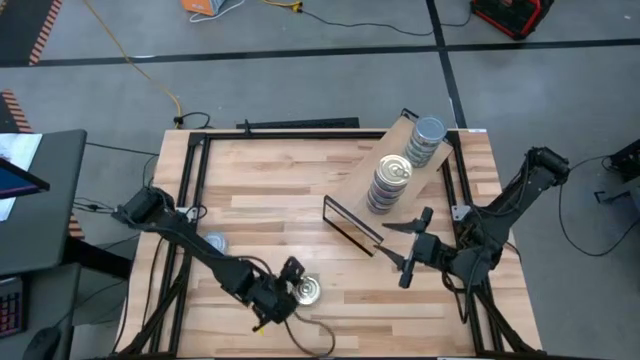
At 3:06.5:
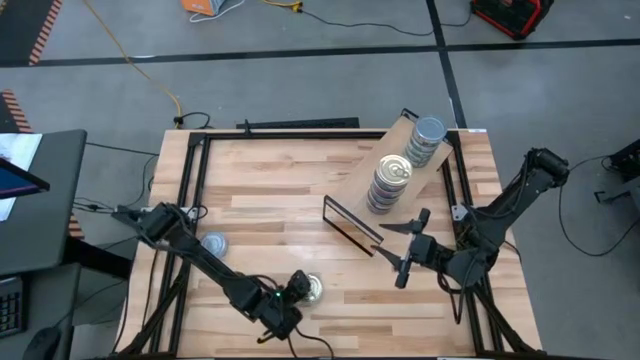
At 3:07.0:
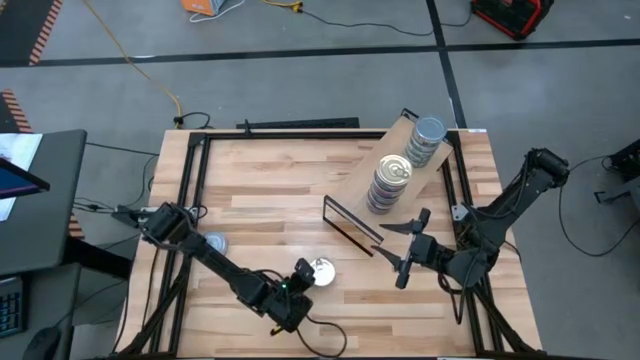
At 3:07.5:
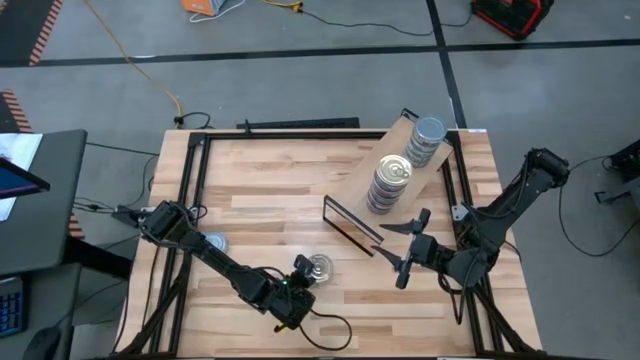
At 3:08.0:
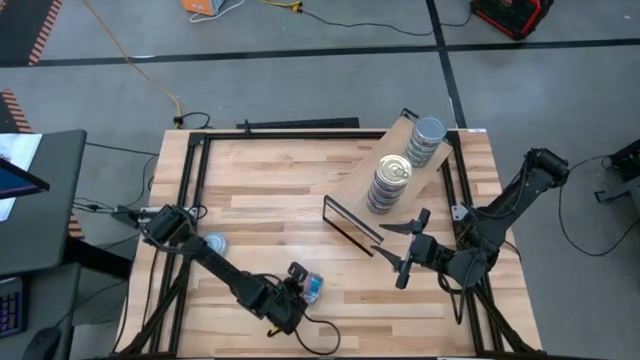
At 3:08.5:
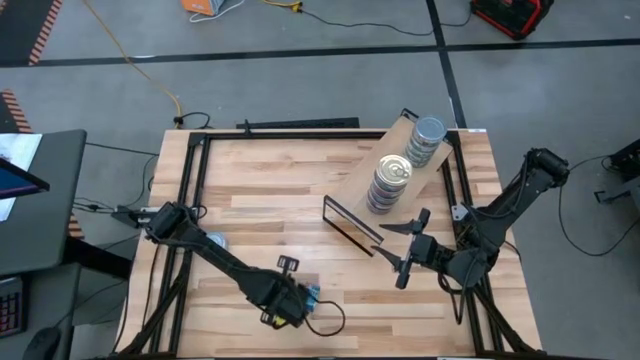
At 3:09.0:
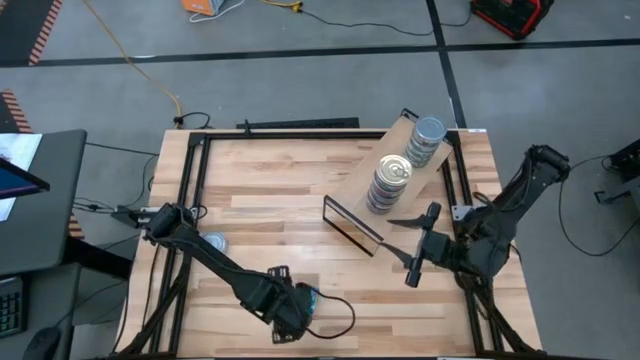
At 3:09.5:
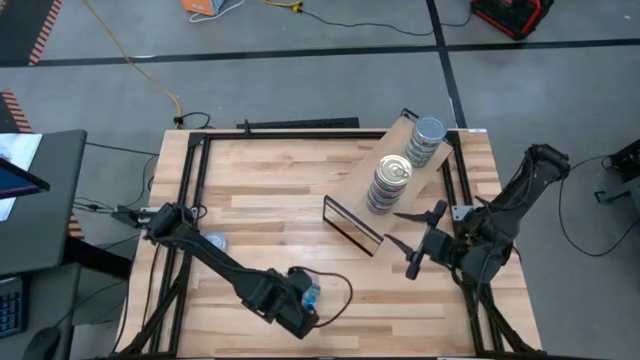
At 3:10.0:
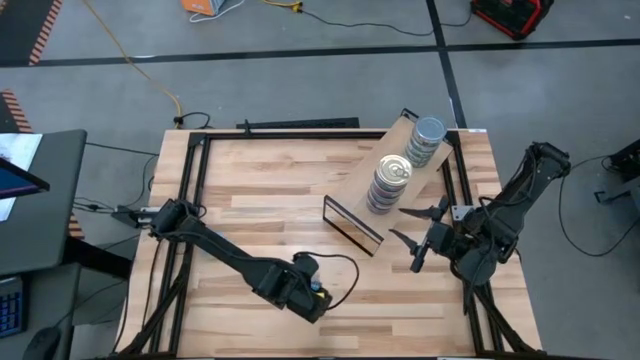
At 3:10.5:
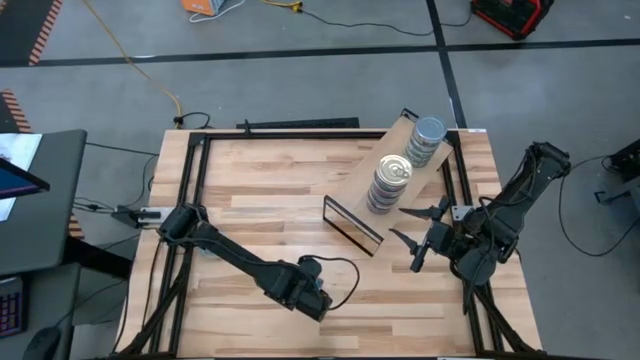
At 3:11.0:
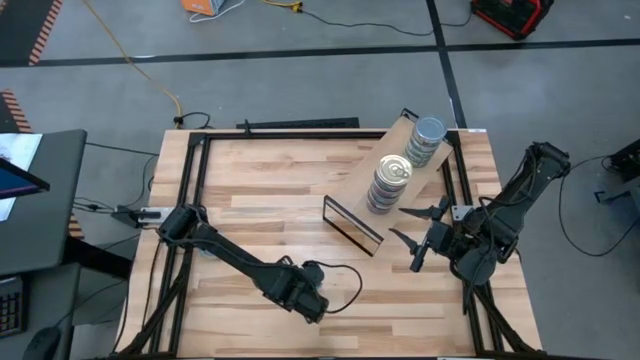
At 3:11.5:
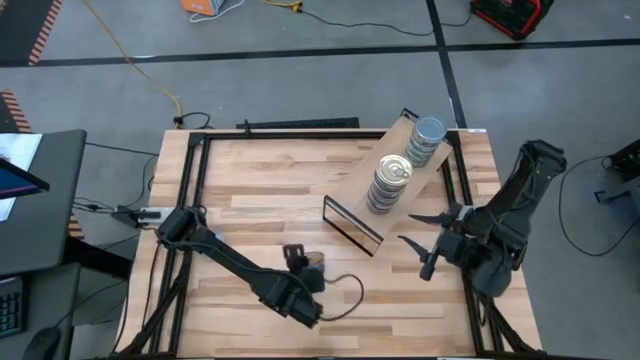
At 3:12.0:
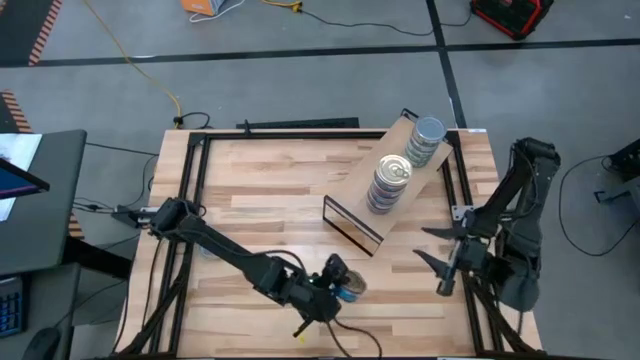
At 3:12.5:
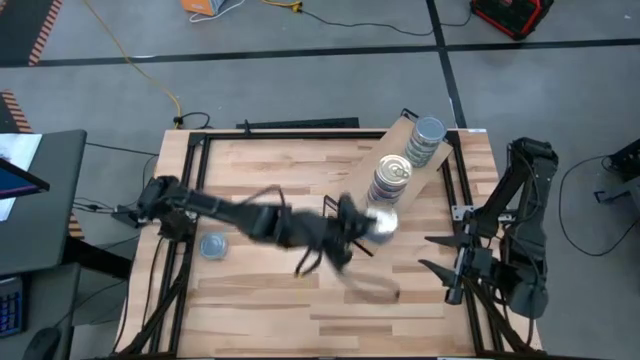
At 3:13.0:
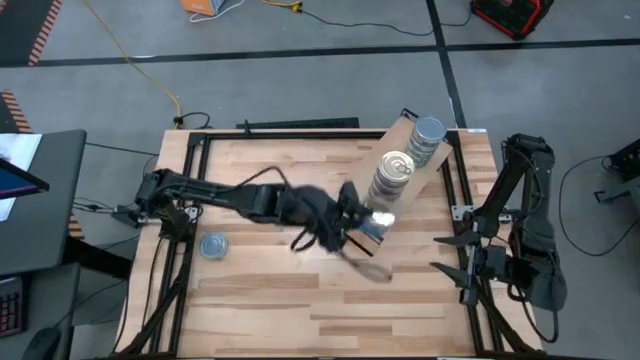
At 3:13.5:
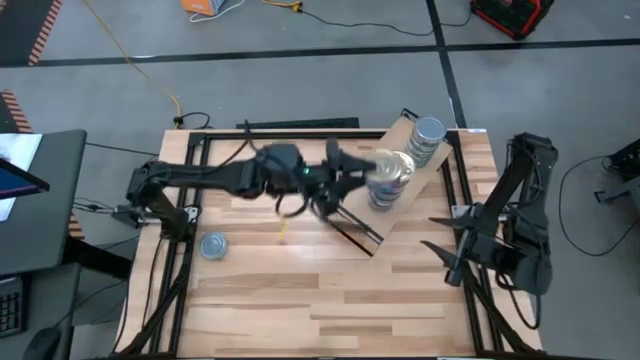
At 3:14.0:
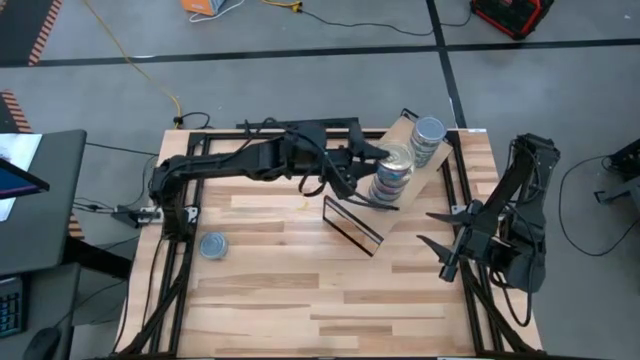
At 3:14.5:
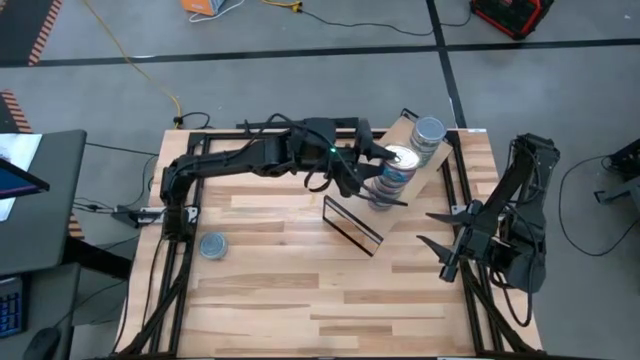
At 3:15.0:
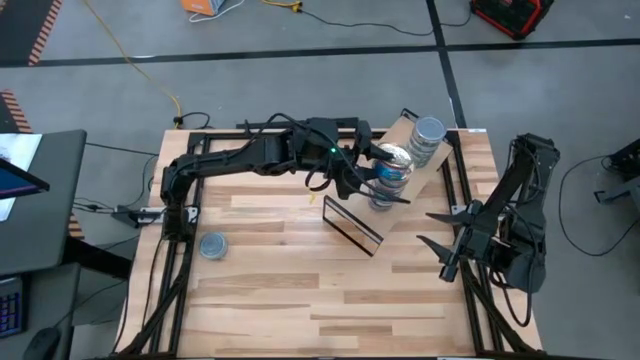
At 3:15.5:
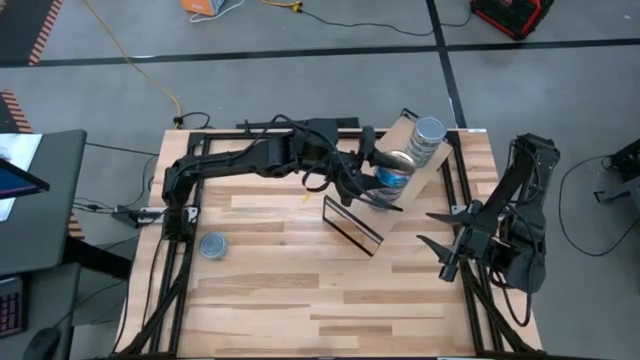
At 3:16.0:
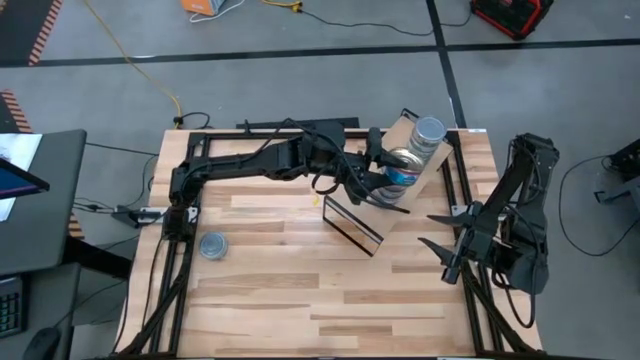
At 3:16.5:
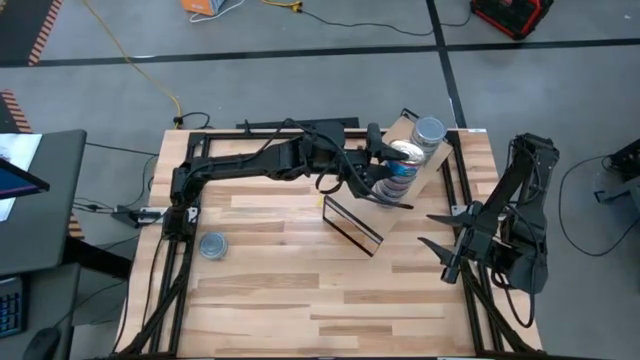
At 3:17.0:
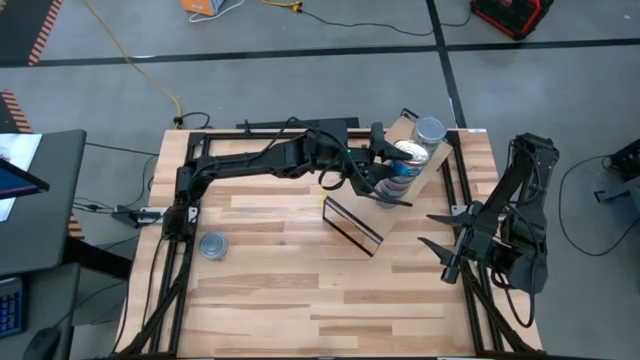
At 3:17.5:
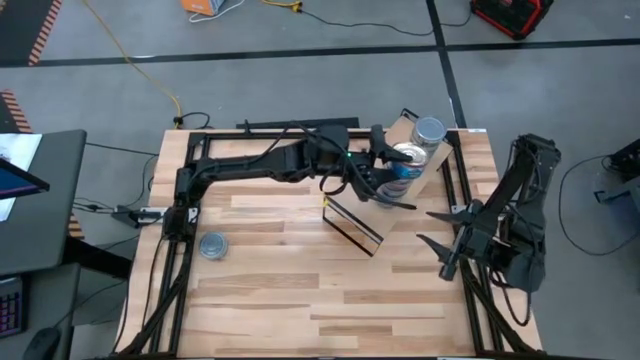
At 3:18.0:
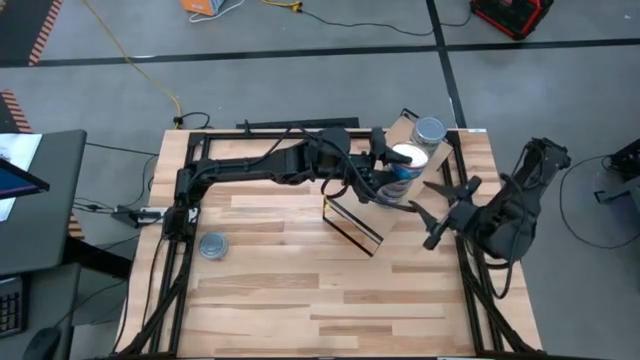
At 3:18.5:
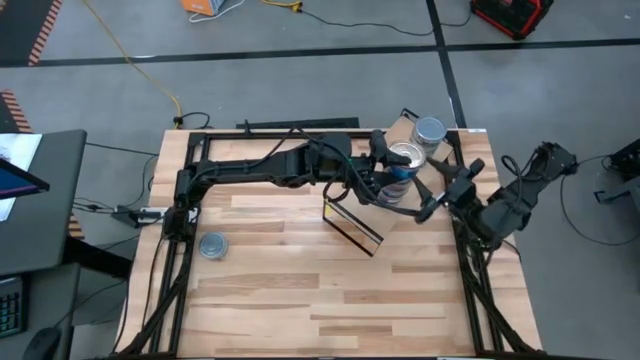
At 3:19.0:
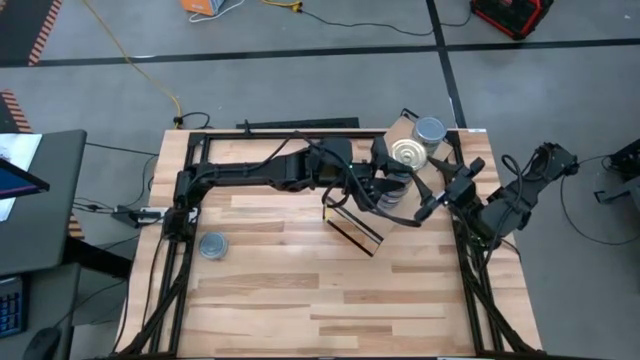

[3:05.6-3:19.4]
Task: Stack canned seafood by type on shelf
Stack the blue and pink tuna can on the shelf

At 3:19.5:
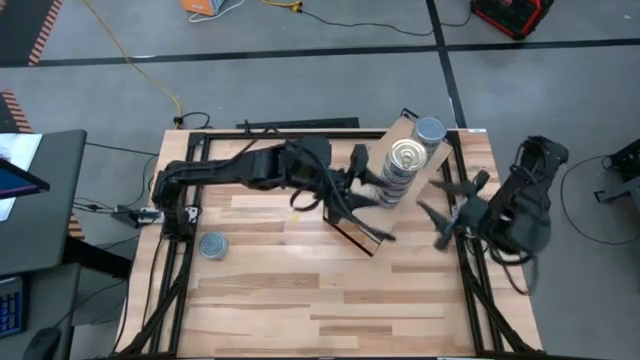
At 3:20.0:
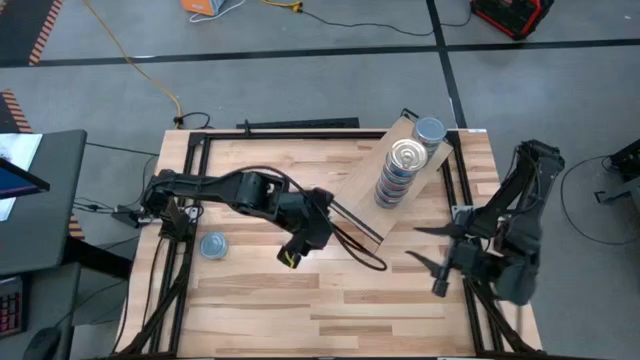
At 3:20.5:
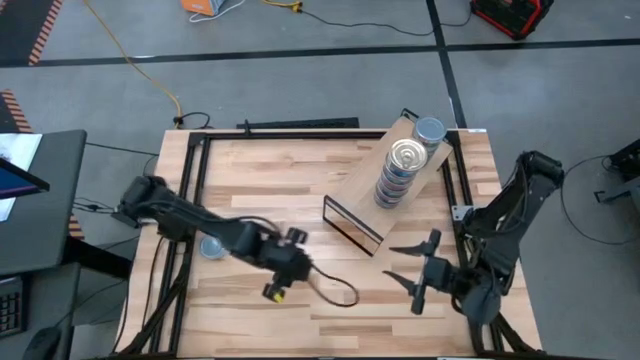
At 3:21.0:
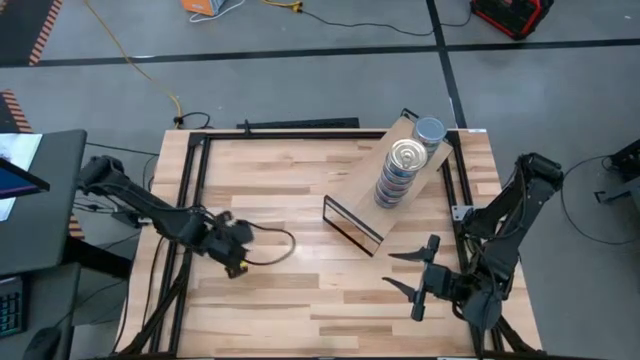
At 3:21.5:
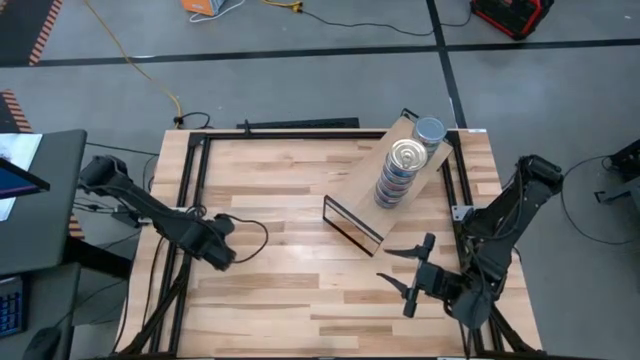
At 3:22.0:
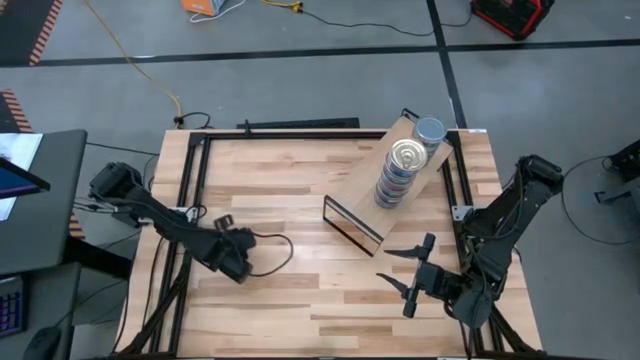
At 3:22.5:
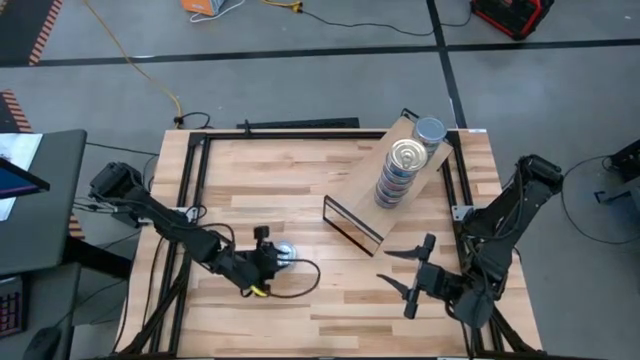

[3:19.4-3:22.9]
Move the green tuna can to the center of the table

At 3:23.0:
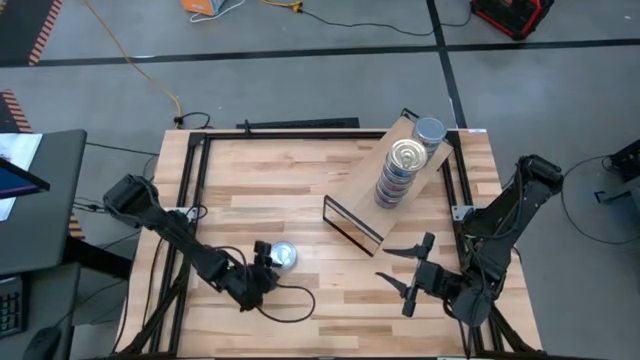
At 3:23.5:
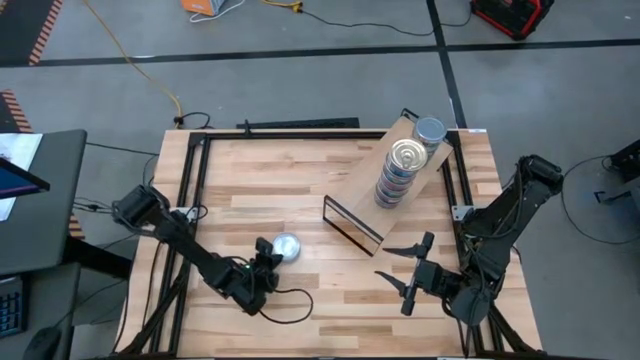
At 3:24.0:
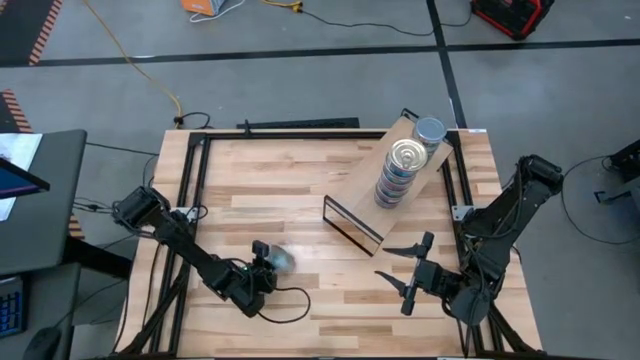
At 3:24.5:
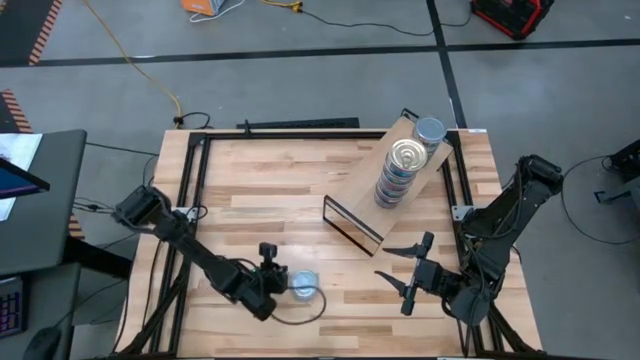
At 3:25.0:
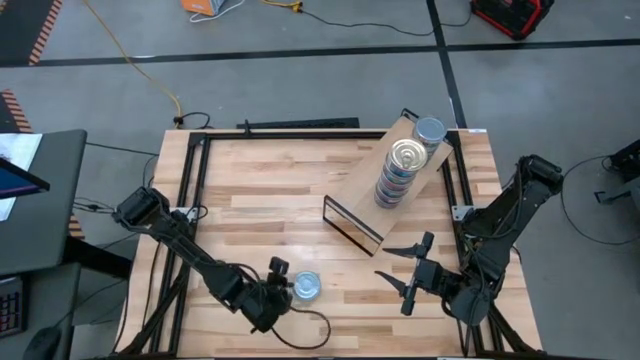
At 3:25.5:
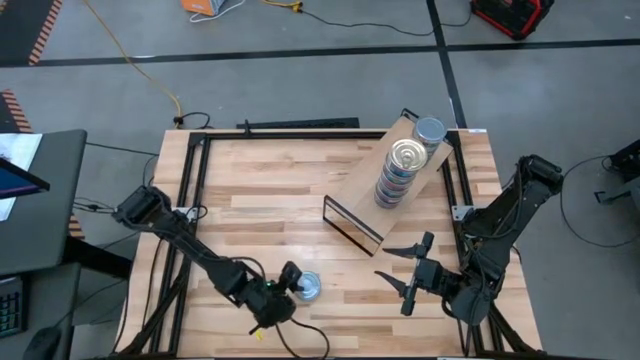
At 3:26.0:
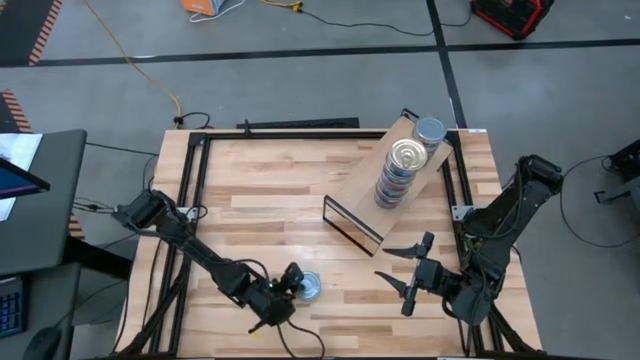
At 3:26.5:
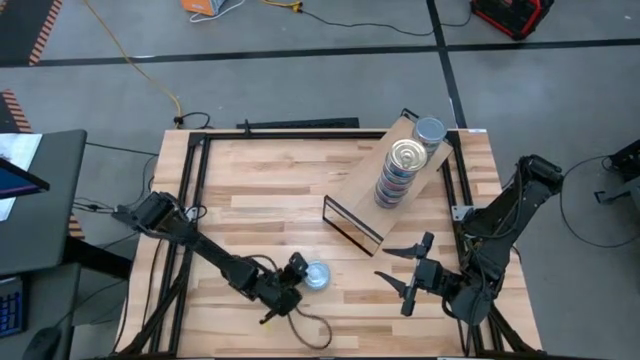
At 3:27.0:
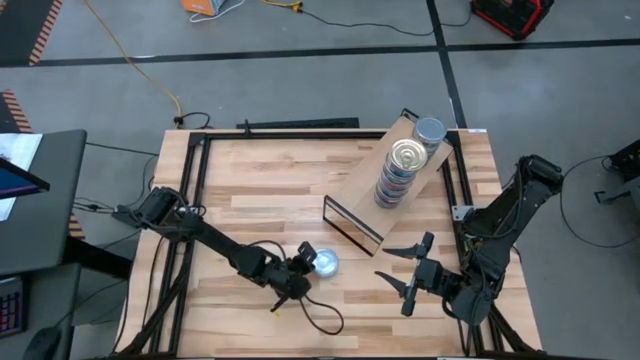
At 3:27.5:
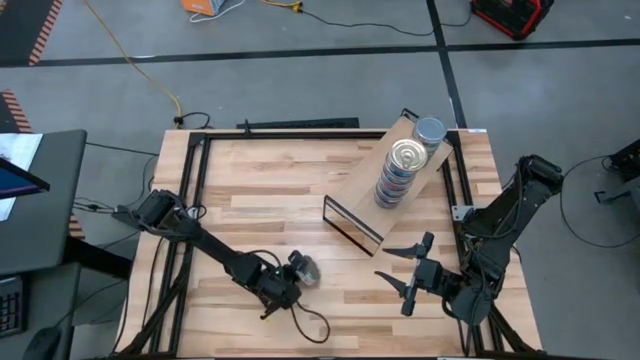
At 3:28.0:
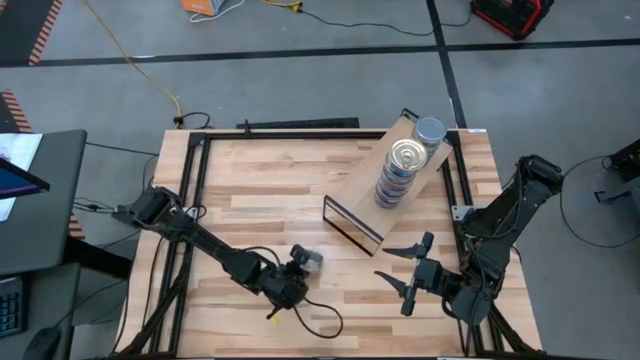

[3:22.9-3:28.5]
Stack the green tuna can on the shelf
